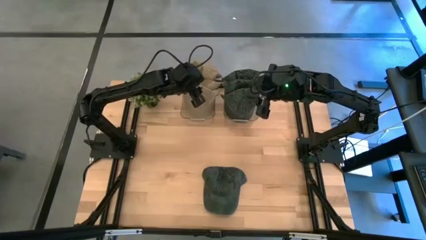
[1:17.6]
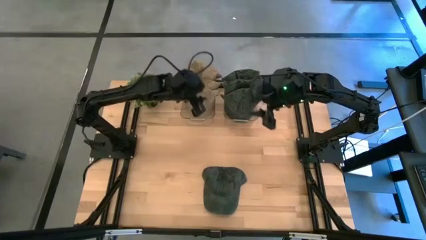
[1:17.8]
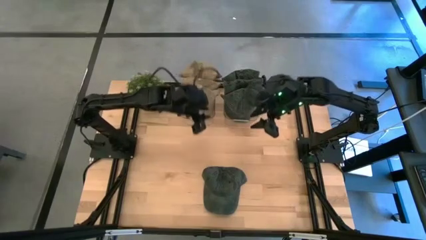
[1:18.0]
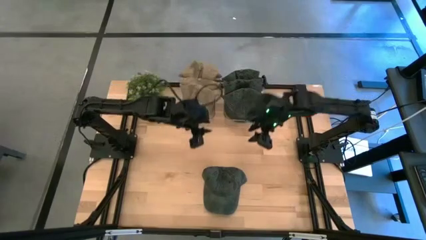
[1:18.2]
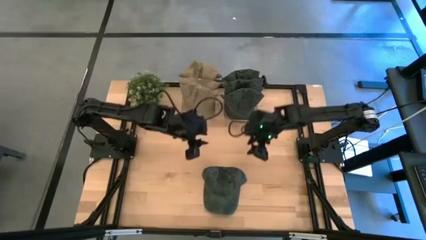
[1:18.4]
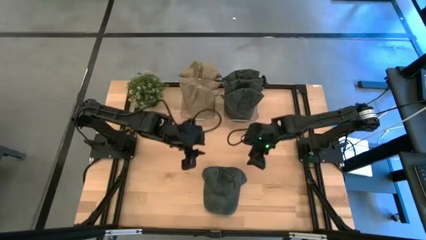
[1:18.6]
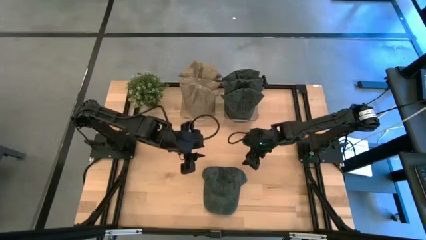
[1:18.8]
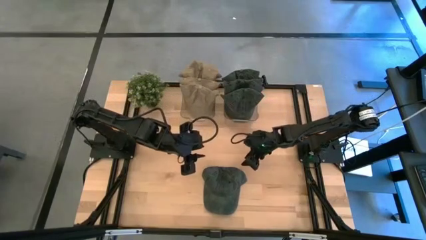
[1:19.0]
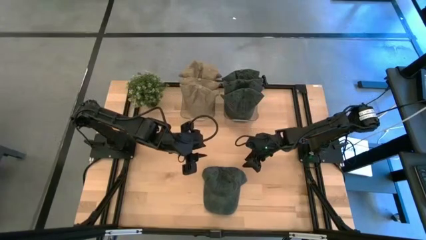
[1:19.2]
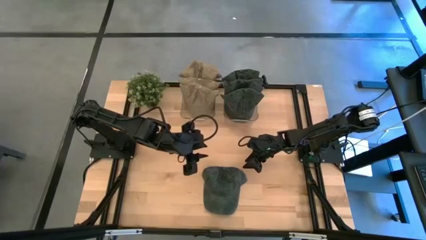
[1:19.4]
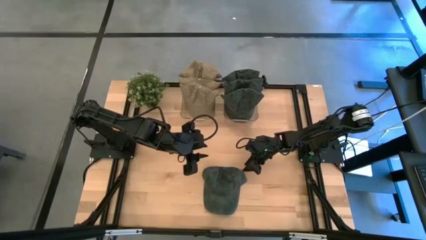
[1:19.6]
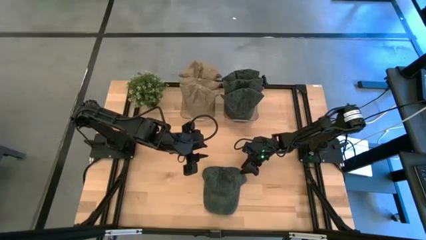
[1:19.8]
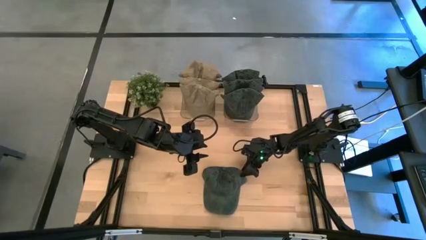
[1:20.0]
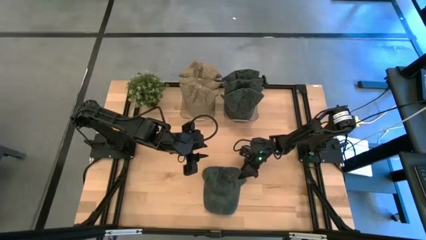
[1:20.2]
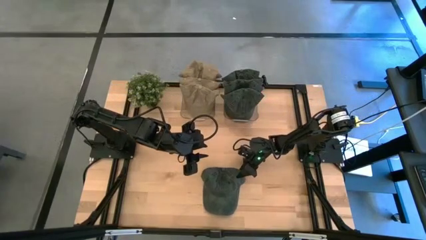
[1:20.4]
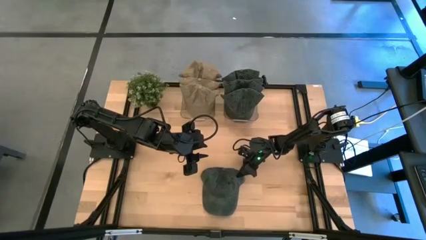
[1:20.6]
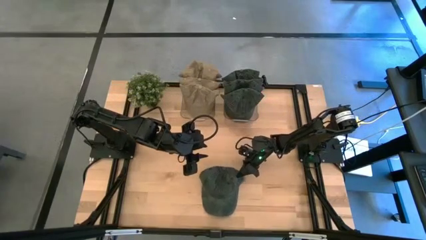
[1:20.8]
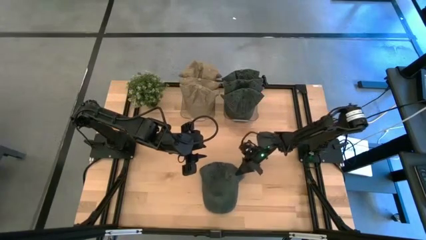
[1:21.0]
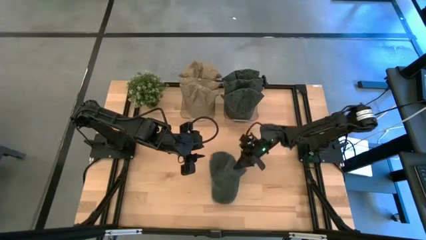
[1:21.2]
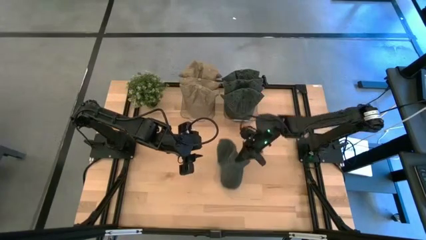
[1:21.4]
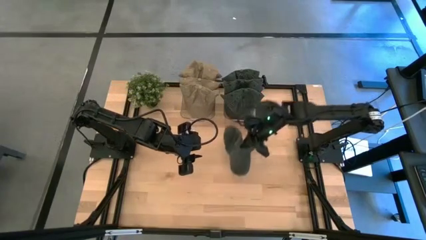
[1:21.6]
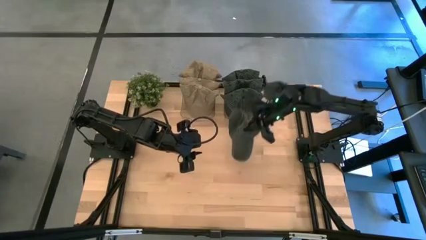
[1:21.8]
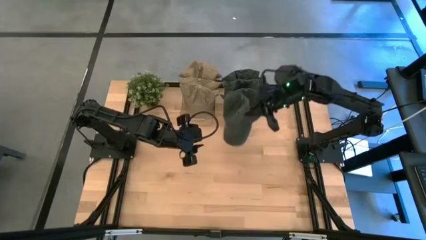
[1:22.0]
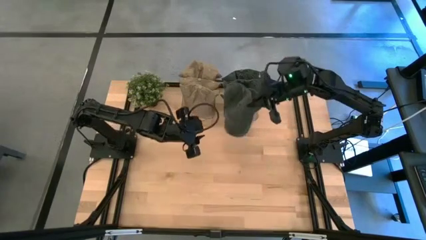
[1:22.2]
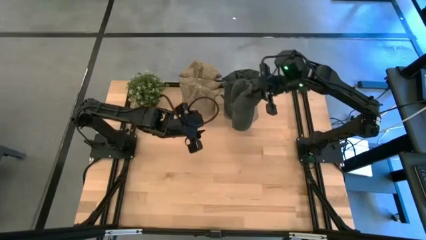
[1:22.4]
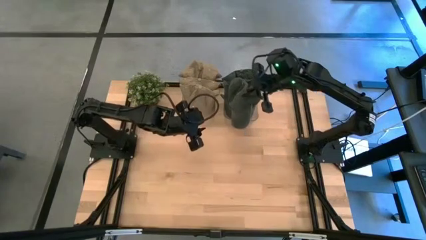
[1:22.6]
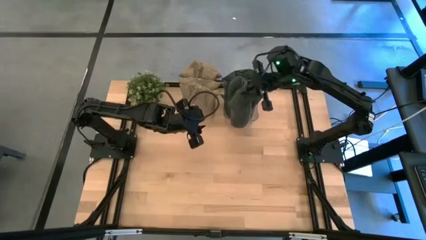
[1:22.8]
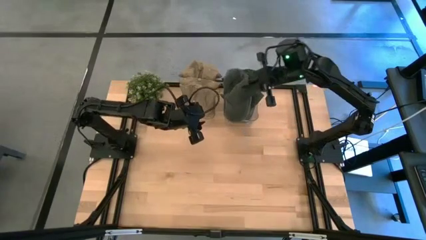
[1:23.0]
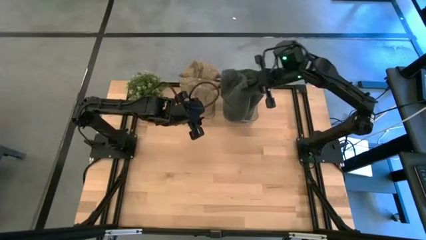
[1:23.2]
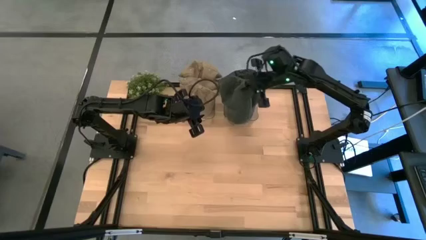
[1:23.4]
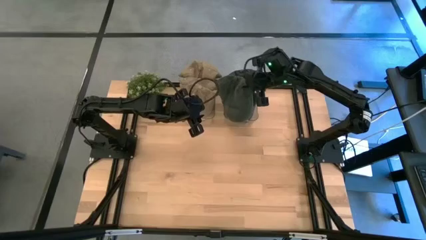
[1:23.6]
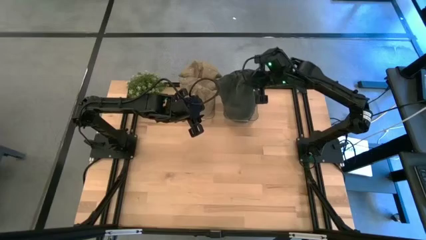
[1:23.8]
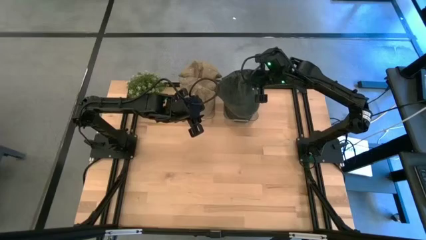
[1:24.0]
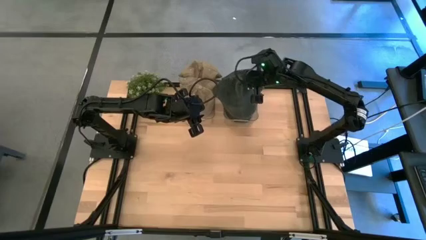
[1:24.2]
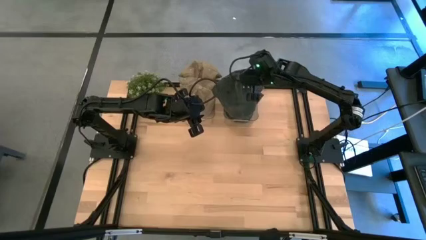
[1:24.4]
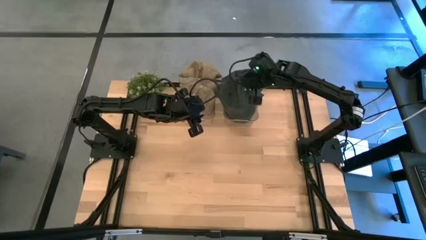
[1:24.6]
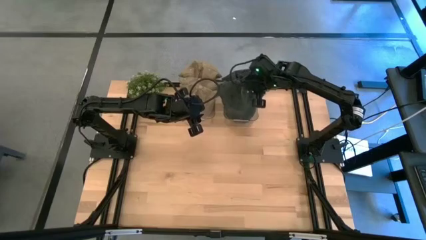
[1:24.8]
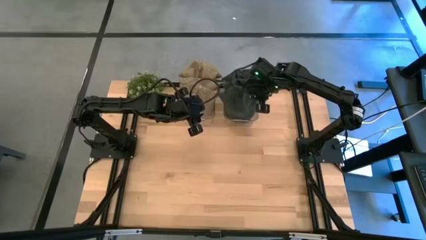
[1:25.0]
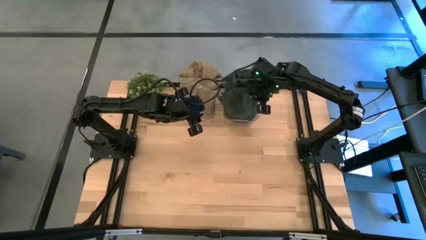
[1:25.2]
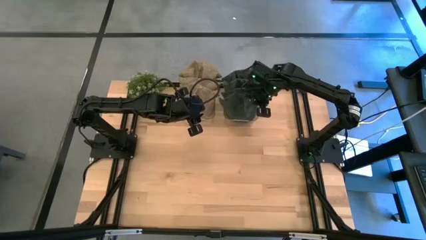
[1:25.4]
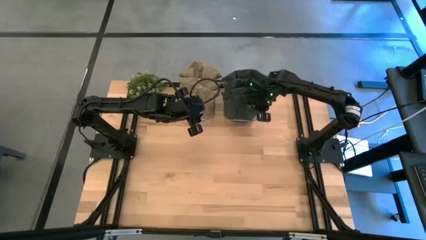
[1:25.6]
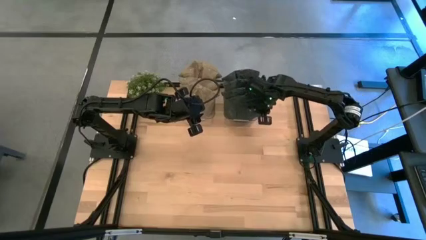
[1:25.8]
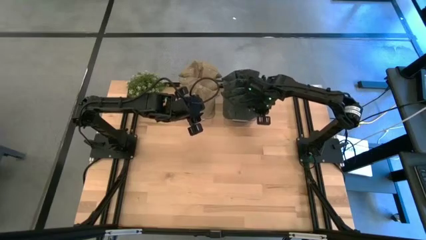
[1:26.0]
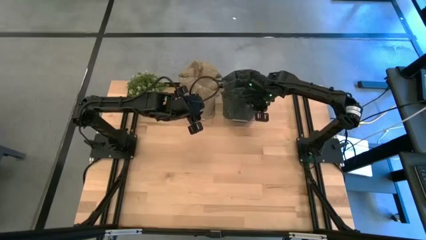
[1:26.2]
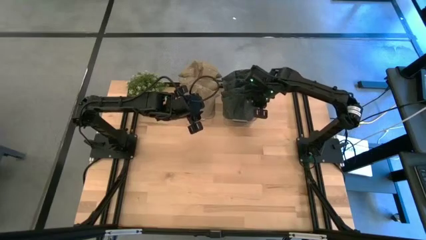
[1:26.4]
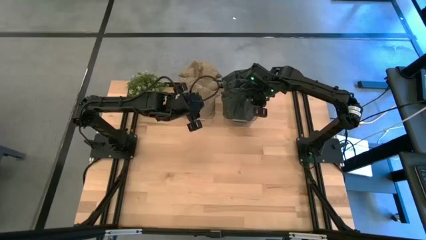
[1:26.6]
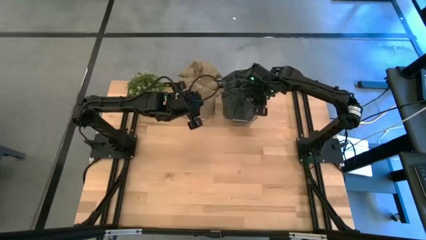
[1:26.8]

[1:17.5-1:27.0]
Task: Pick & Place hat
Put the black cap into the right transparent bin

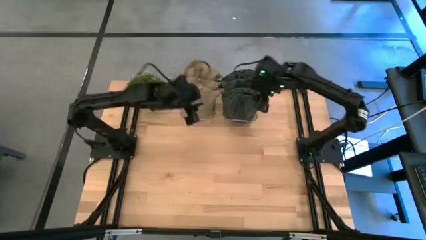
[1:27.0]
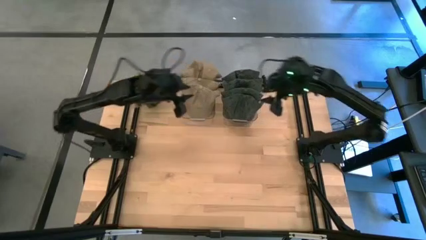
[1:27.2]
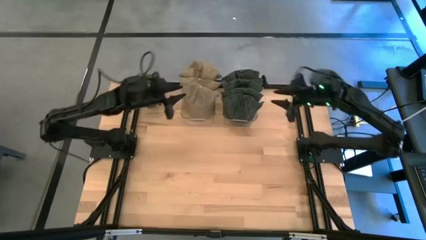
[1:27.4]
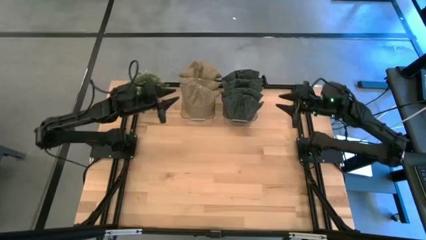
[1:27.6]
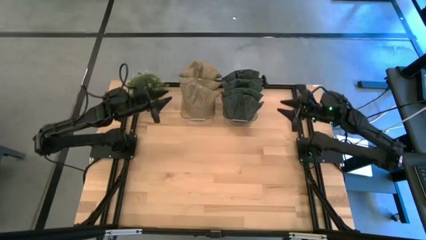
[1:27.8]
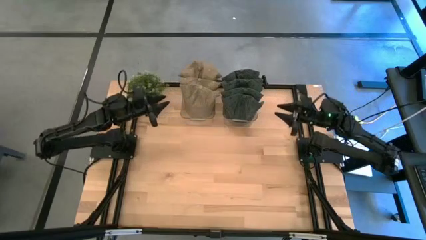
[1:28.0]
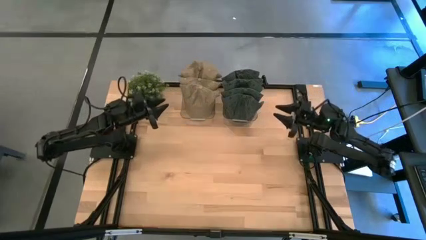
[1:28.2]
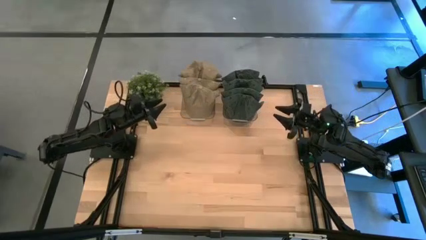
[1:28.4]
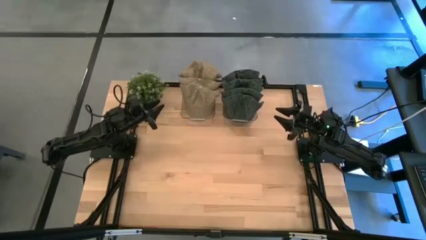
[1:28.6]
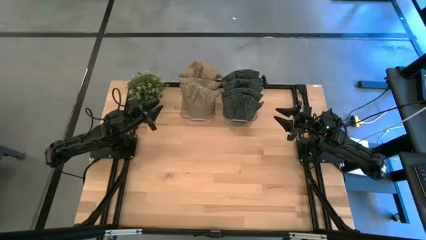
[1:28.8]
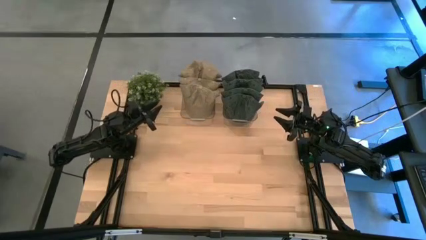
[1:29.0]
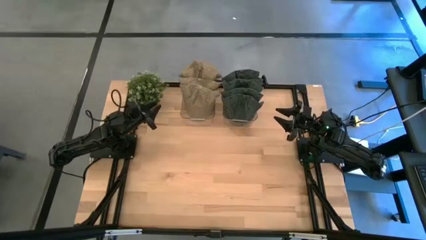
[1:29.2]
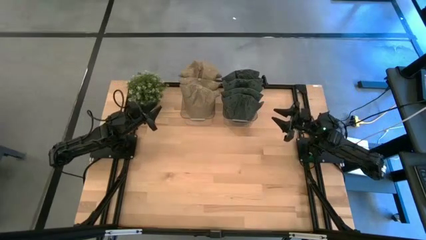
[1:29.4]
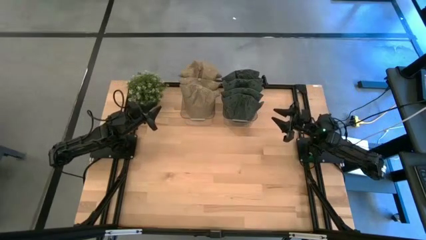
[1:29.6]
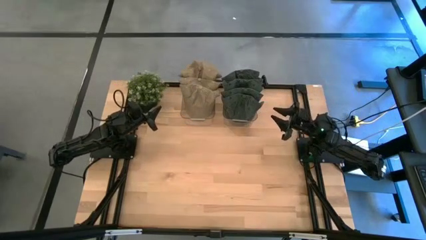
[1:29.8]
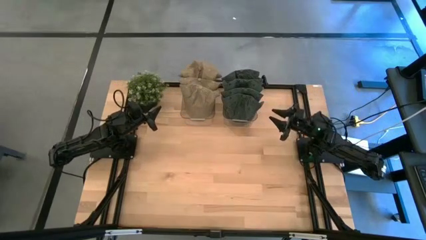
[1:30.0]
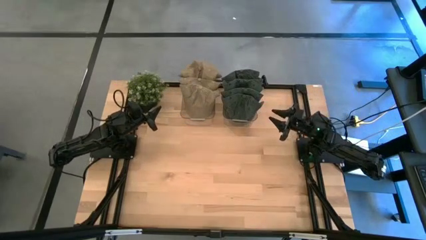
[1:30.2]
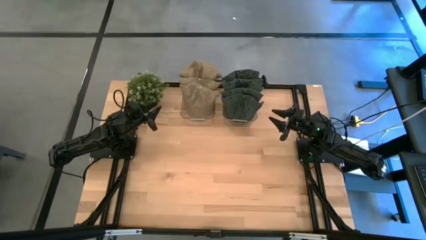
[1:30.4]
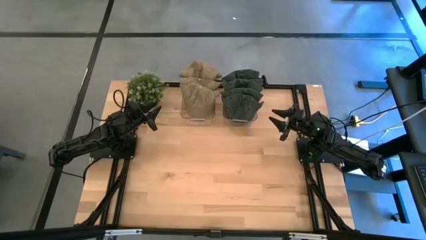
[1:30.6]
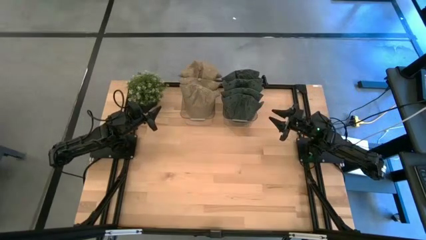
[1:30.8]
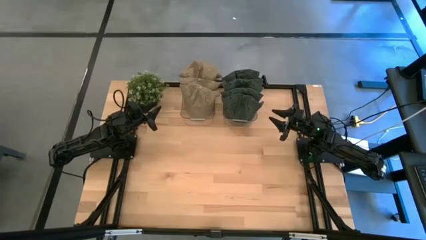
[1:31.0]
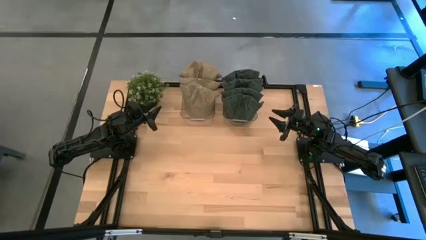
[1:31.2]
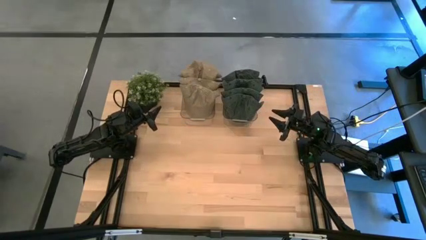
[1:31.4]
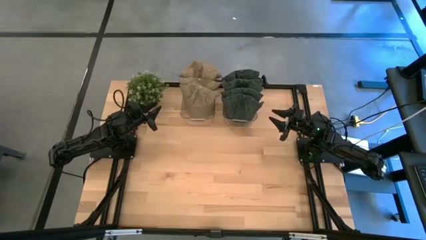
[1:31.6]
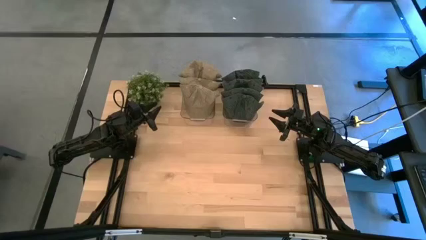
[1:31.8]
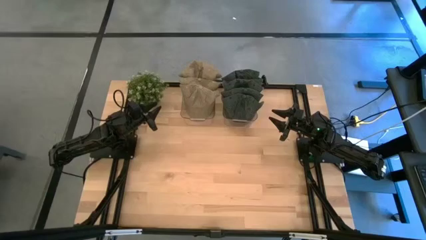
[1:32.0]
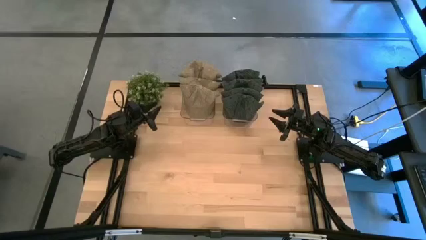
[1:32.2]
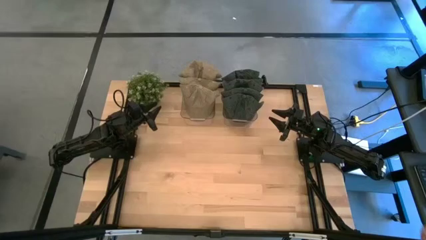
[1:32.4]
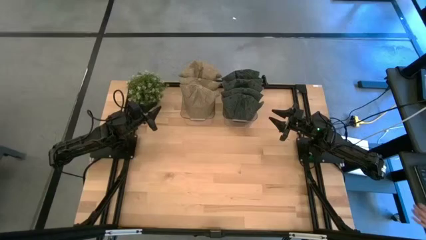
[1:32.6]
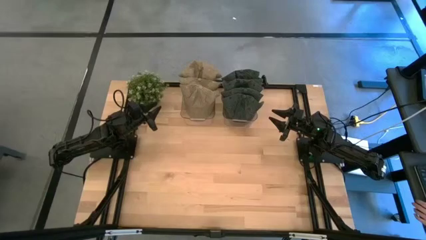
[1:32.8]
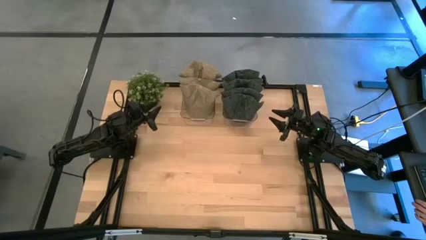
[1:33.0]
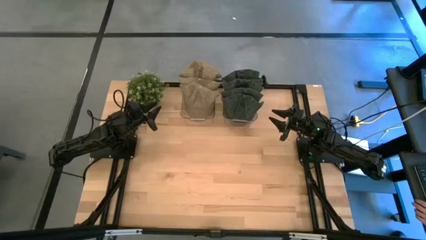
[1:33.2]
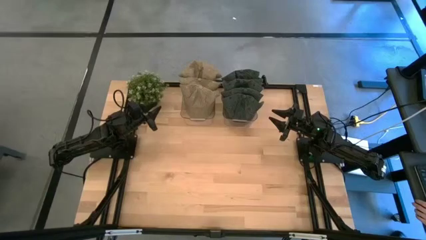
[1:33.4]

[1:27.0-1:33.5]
Return to Home Position
